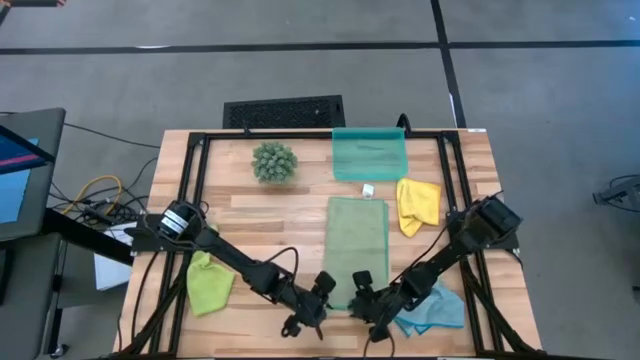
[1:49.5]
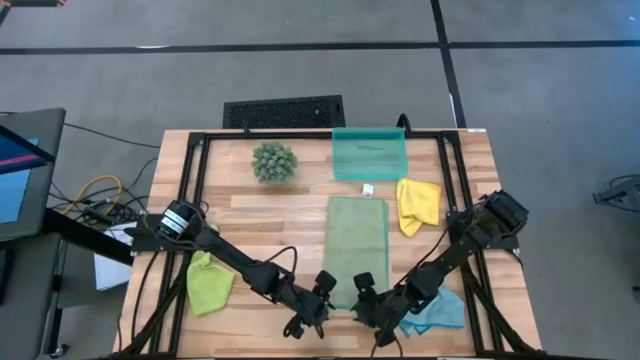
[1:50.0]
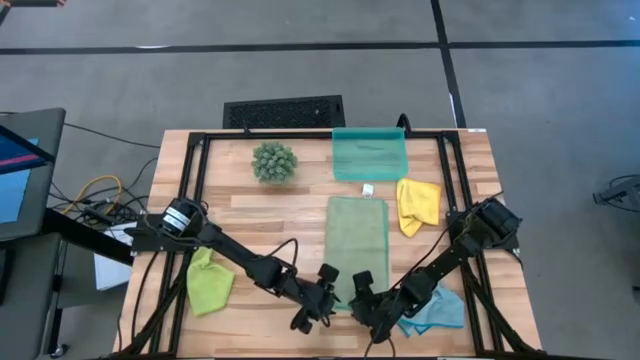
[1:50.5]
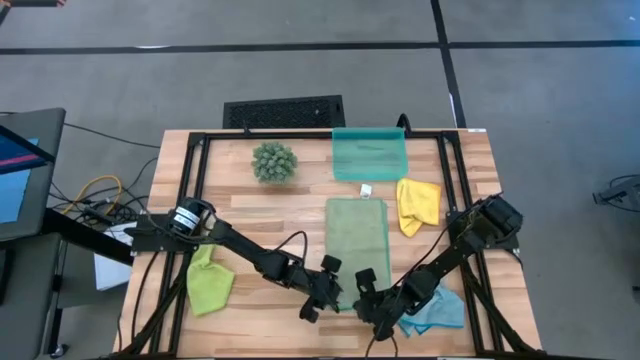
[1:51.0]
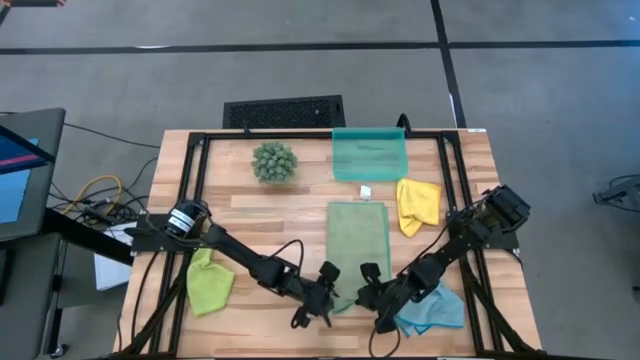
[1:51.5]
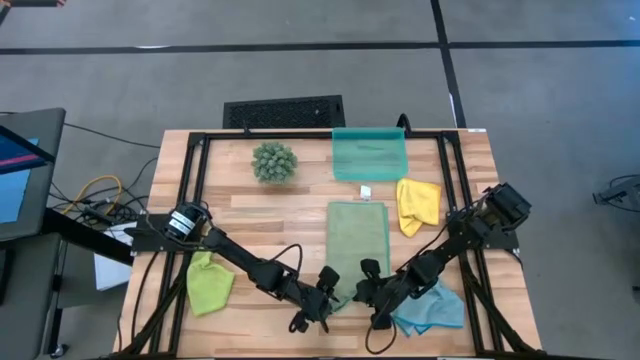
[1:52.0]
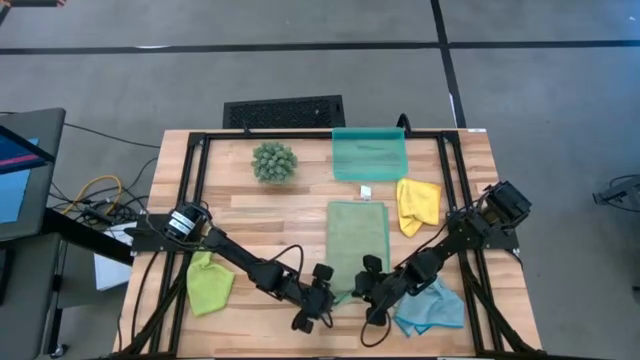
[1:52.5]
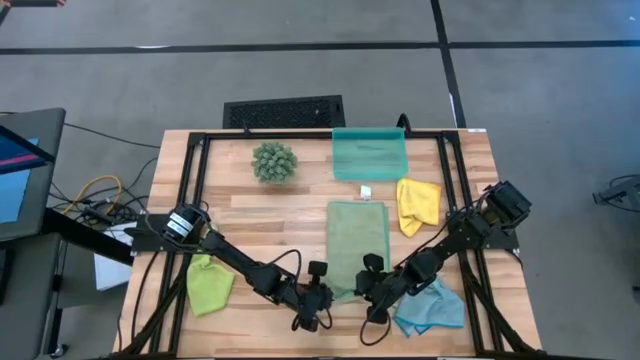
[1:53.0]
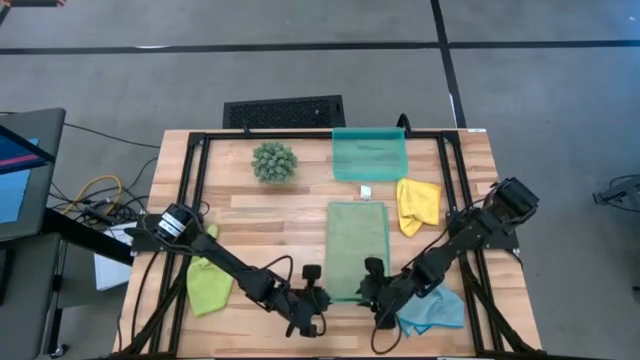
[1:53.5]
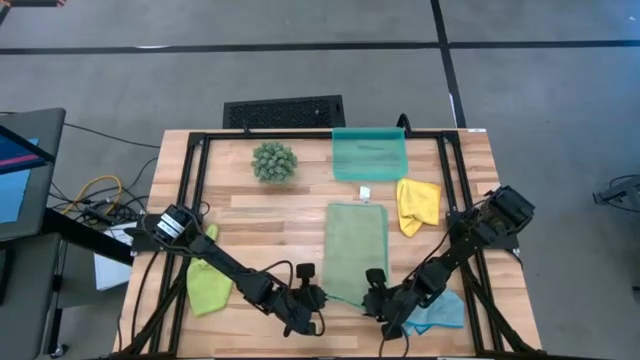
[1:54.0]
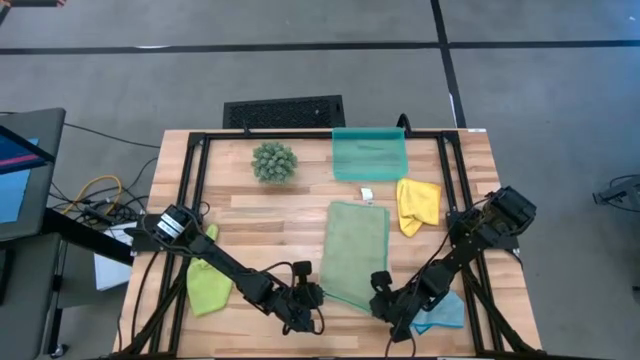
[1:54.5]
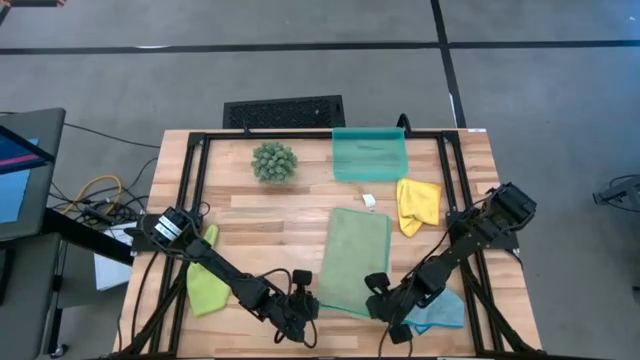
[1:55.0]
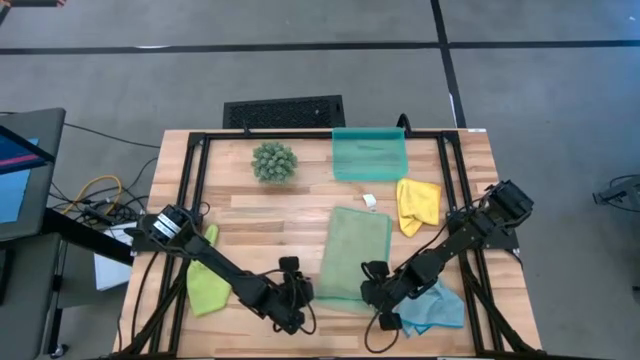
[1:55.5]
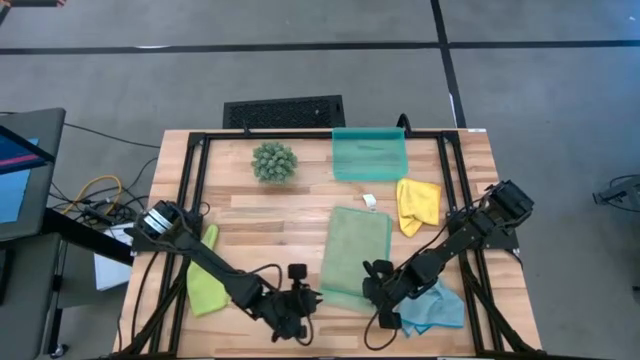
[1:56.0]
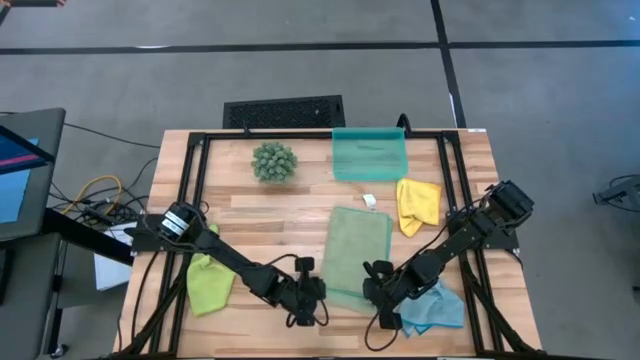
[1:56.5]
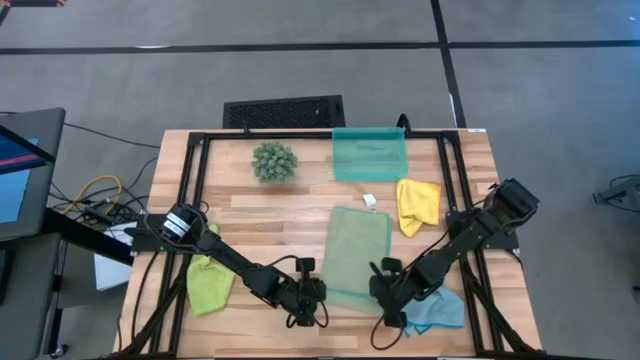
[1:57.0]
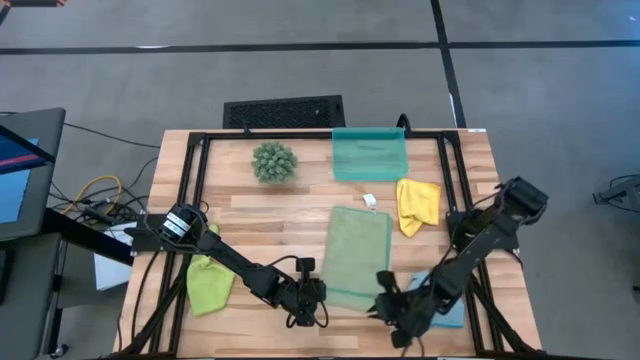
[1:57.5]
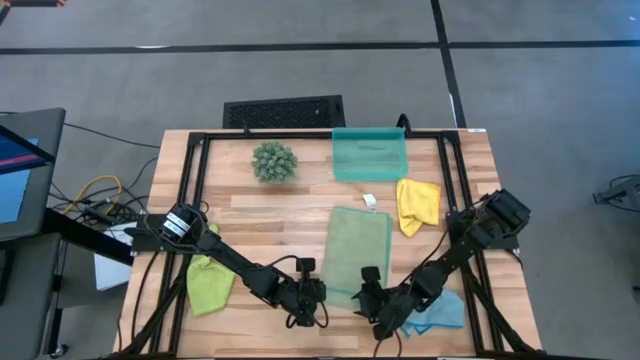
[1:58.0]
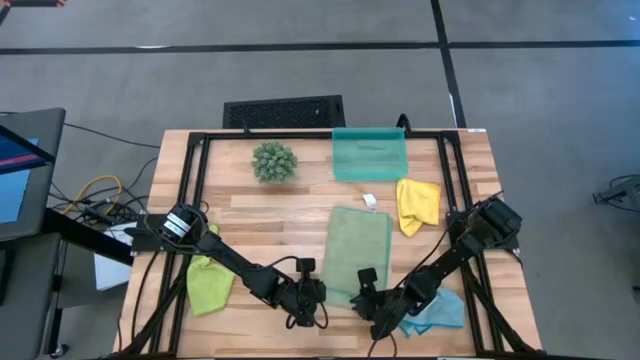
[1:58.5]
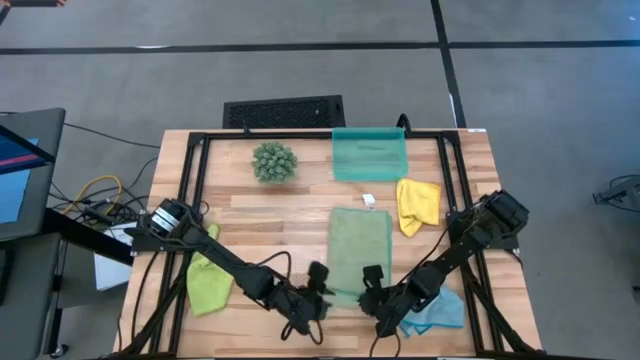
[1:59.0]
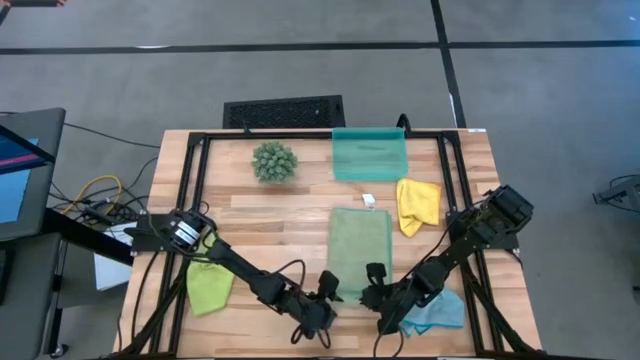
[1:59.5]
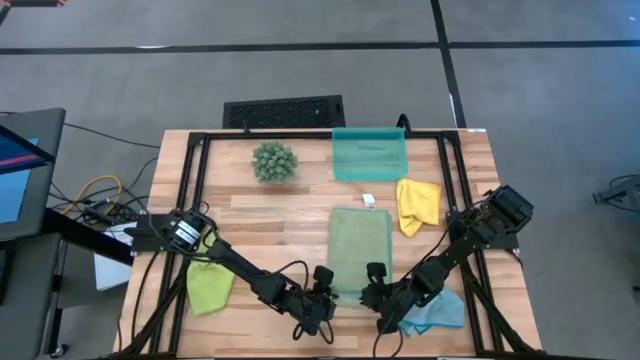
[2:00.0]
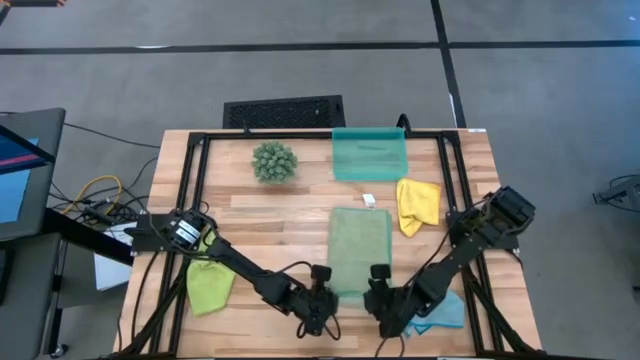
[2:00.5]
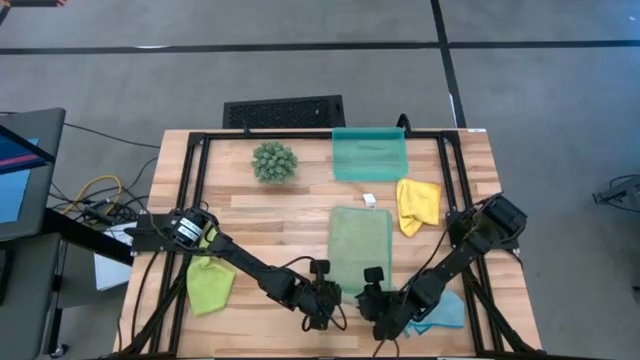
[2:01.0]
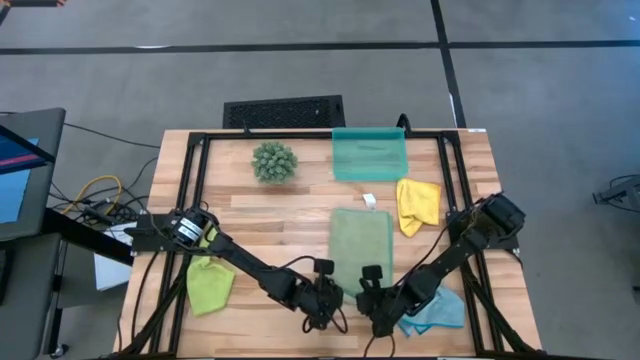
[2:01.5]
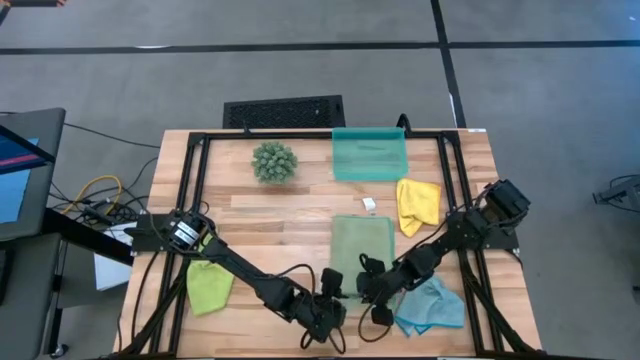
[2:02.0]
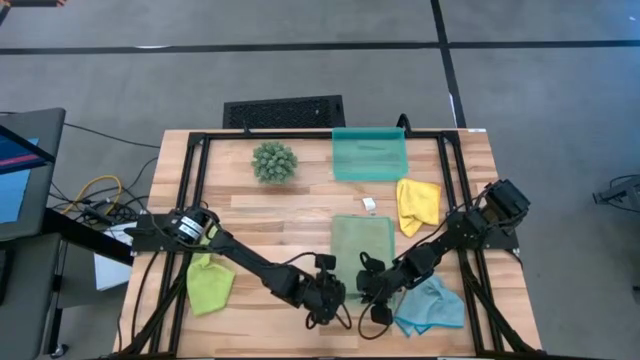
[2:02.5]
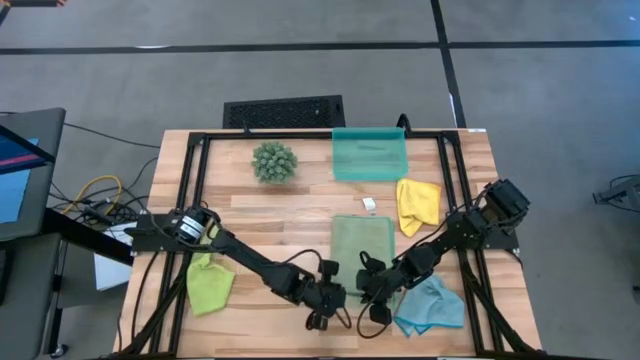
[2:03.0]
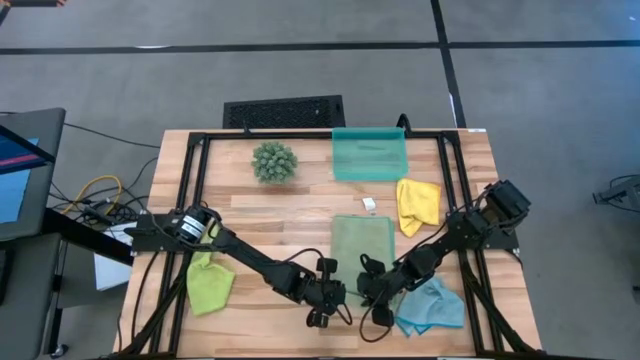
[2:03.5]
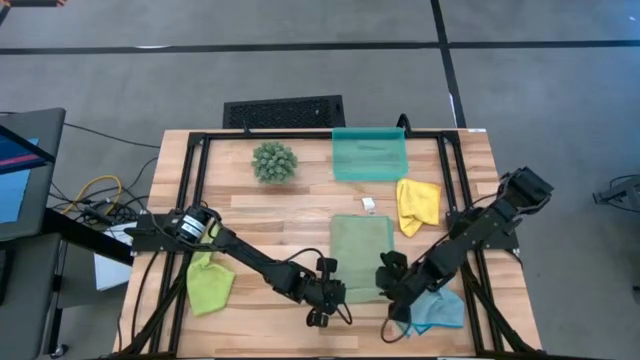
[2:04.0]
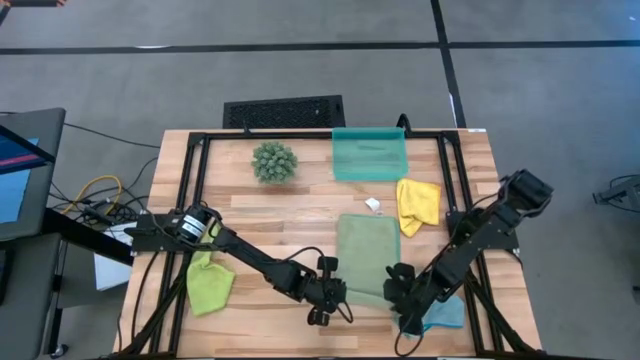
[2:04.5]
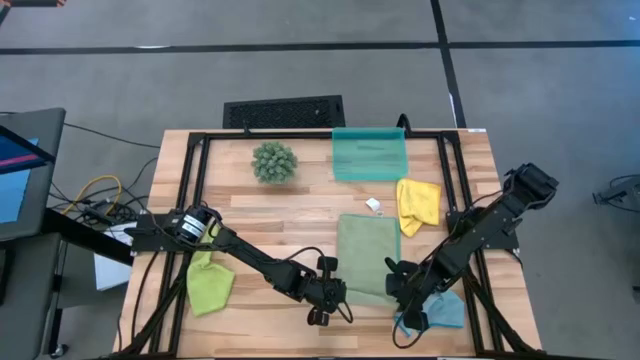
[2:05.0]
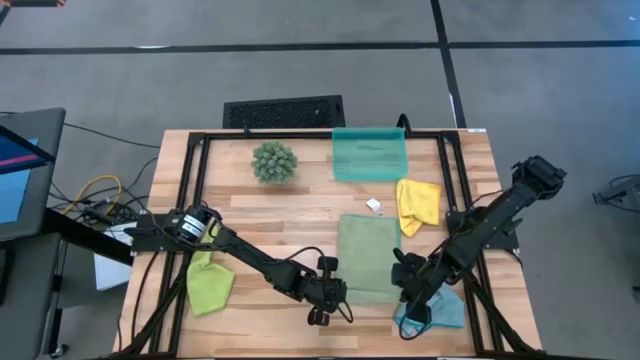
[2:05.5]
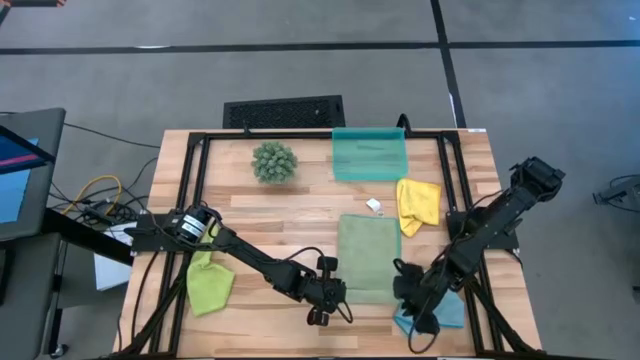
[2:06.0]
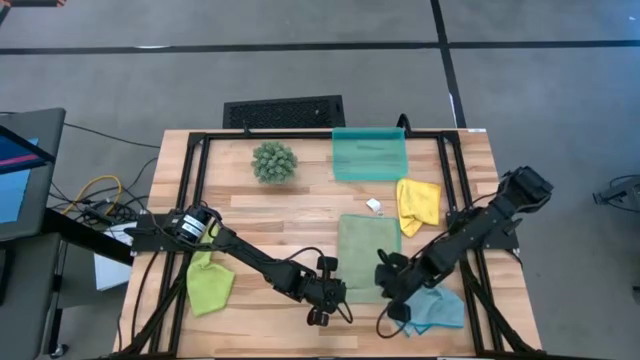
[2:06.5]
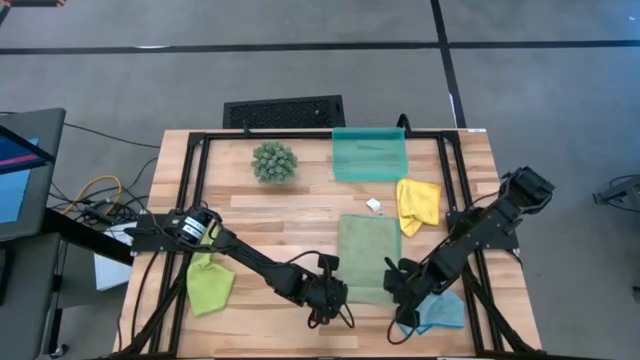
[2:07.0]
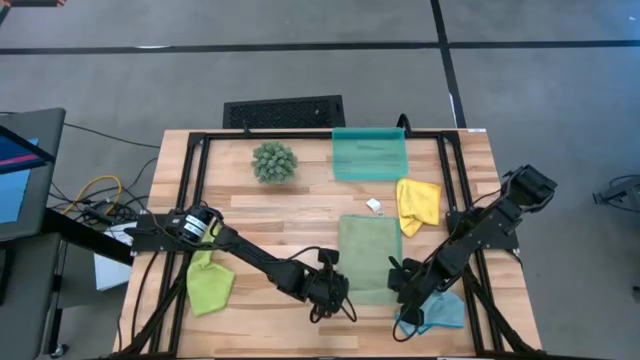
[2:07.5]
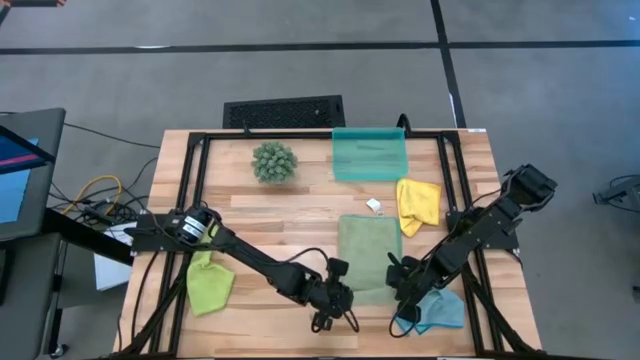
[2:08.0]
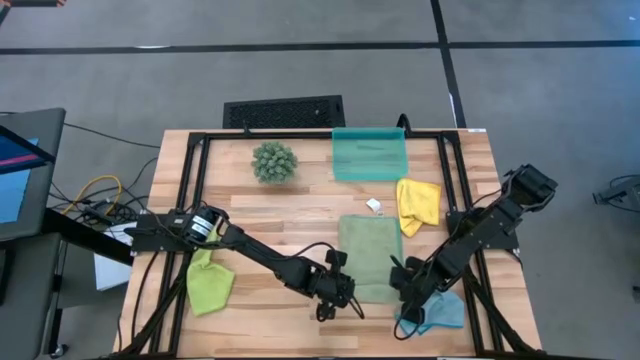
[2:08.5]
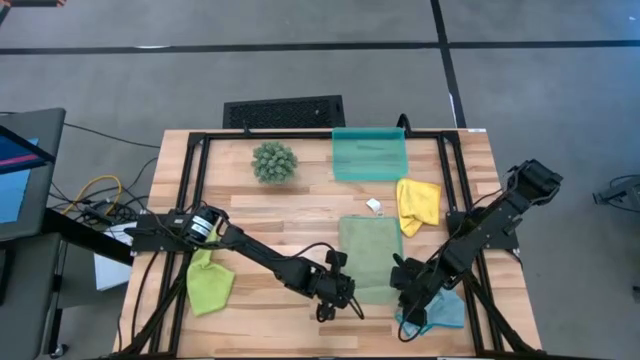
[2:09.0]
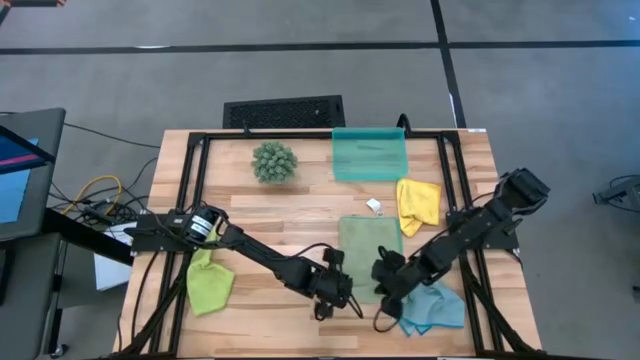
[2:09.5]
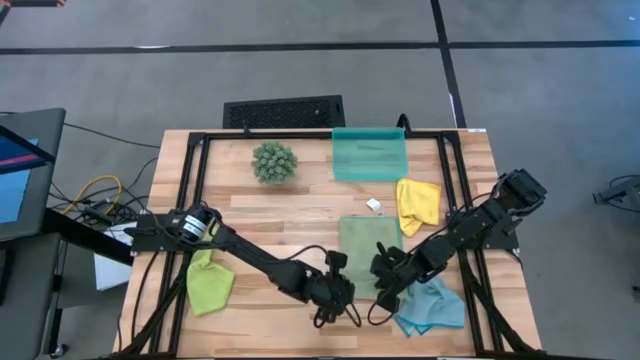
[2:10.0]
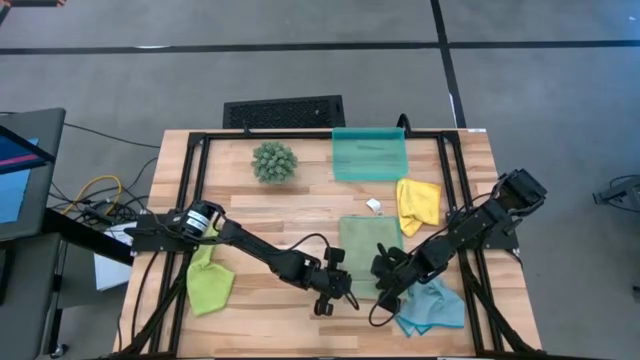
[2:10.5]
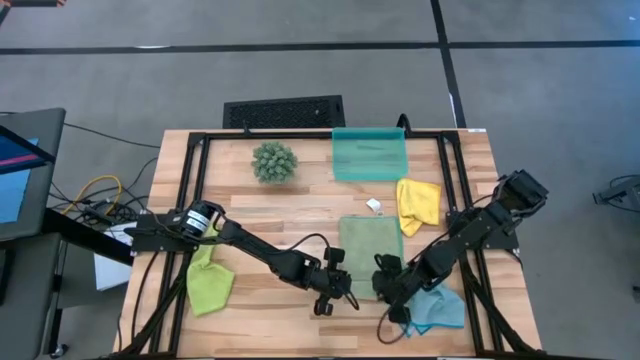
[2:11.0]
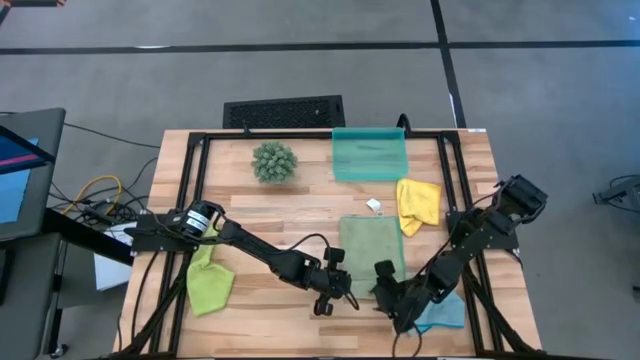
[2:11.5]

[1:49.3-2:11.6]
Task: Roll microfiber towels into tight, uniform cylinder then place into a basket
Roll the dark green microfiber cloth
